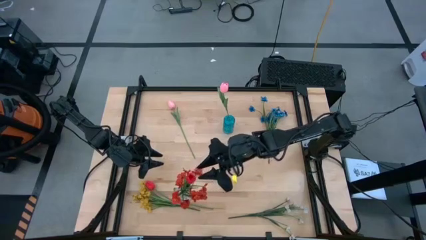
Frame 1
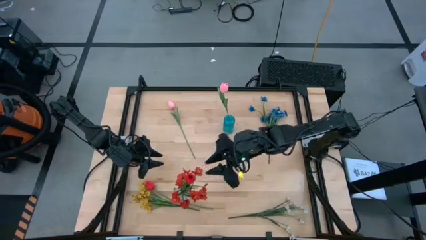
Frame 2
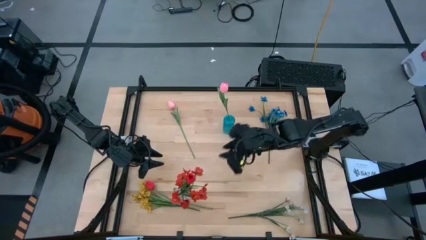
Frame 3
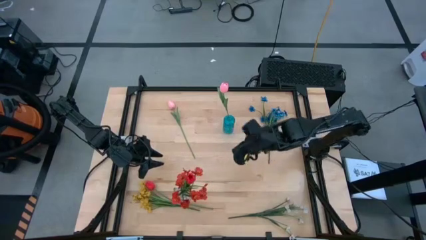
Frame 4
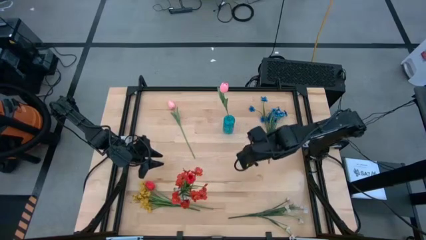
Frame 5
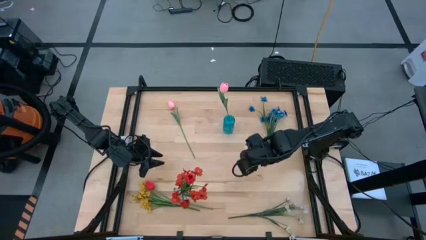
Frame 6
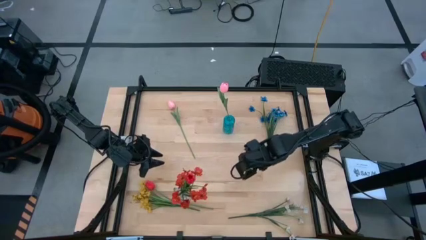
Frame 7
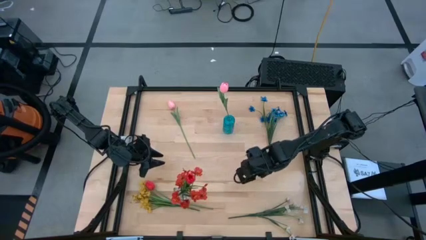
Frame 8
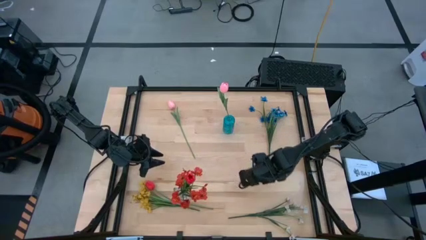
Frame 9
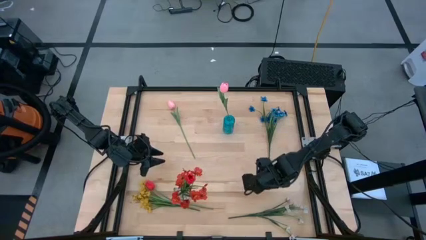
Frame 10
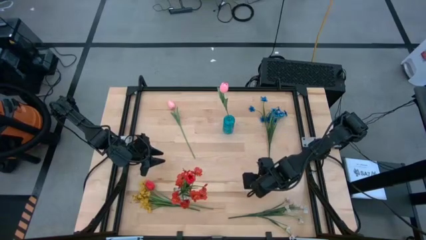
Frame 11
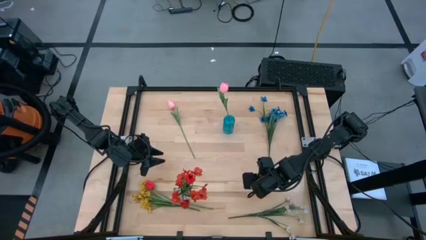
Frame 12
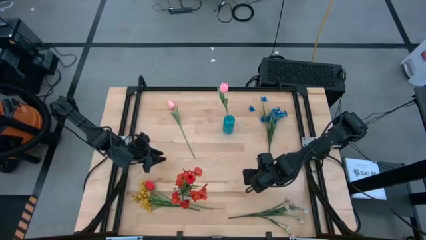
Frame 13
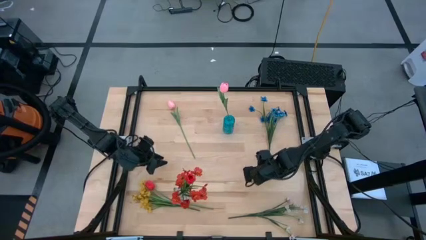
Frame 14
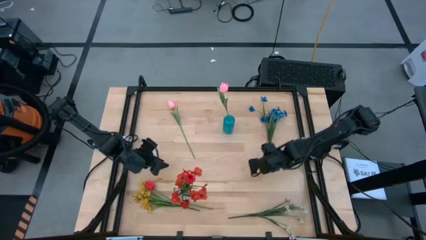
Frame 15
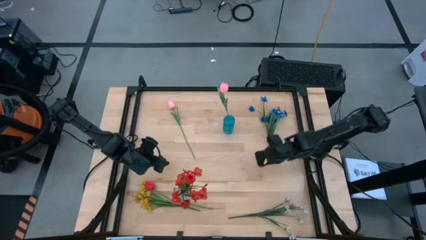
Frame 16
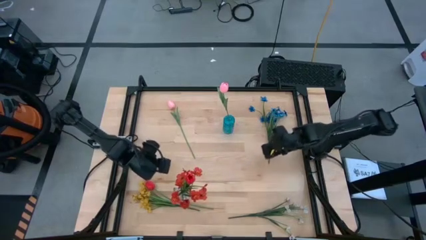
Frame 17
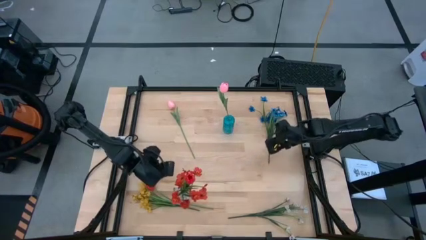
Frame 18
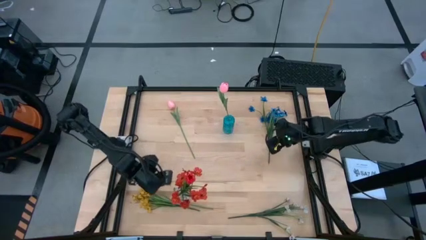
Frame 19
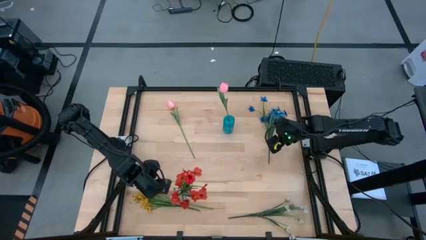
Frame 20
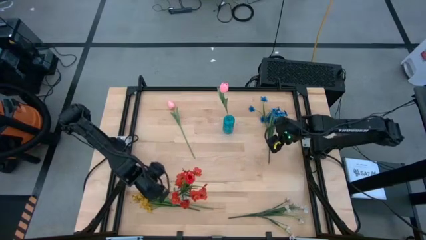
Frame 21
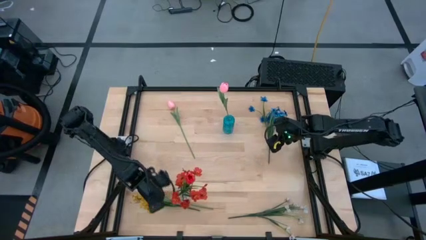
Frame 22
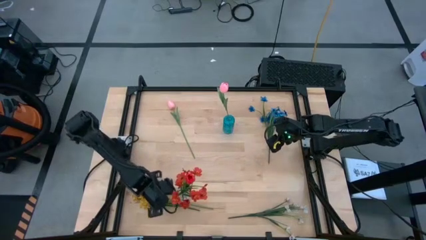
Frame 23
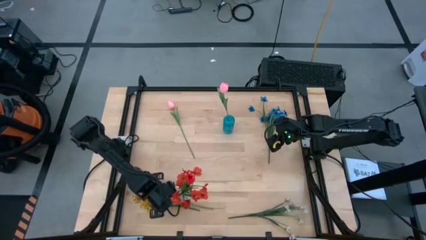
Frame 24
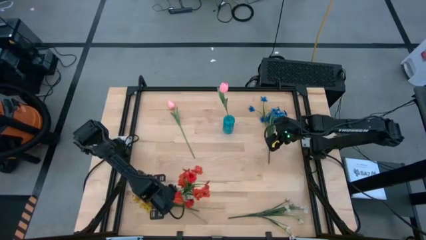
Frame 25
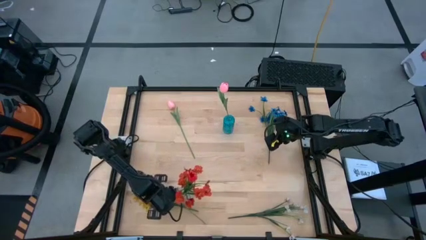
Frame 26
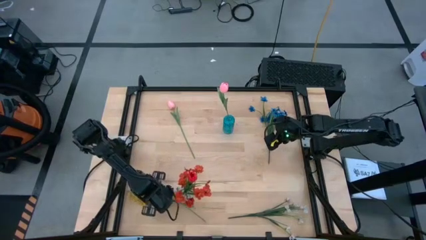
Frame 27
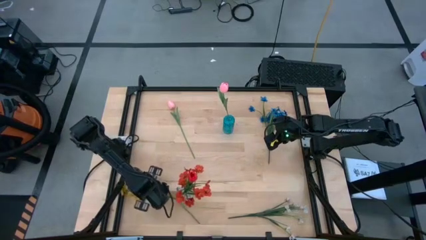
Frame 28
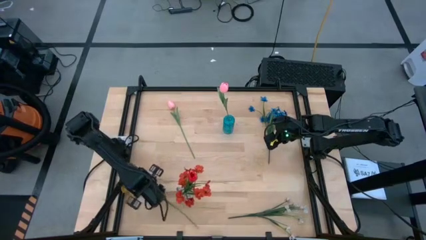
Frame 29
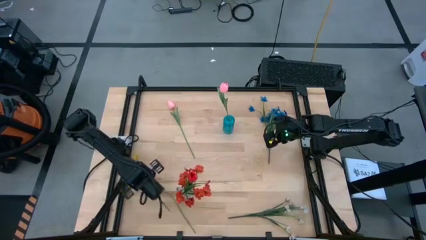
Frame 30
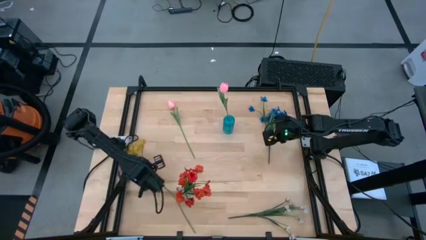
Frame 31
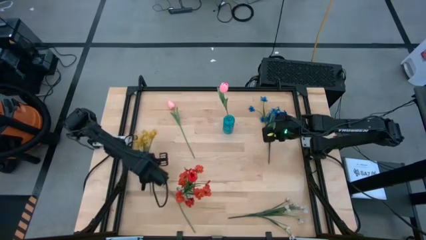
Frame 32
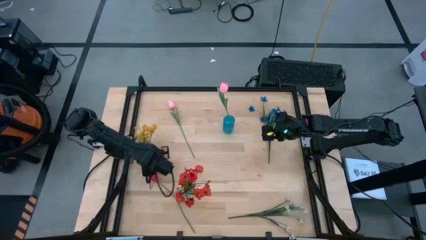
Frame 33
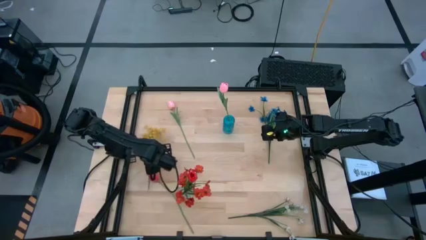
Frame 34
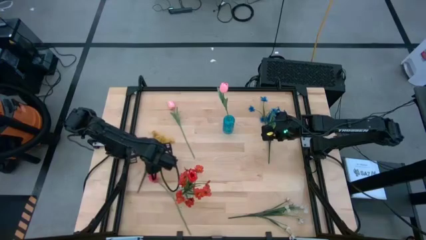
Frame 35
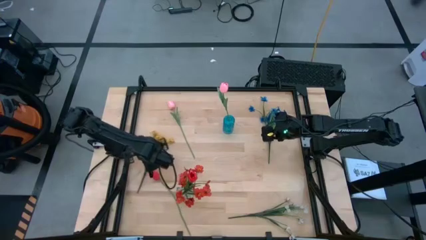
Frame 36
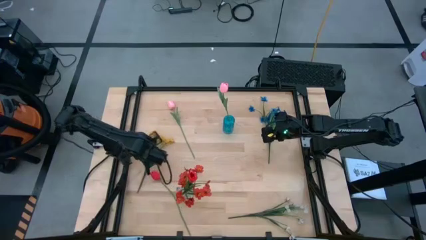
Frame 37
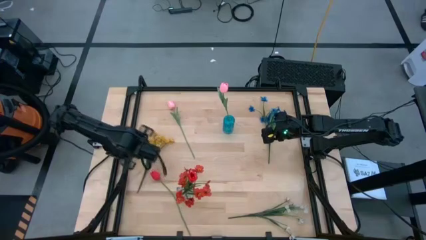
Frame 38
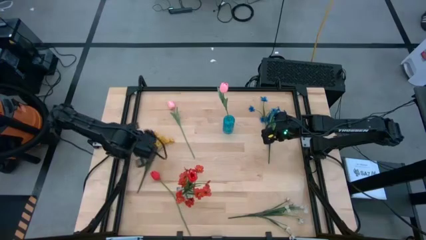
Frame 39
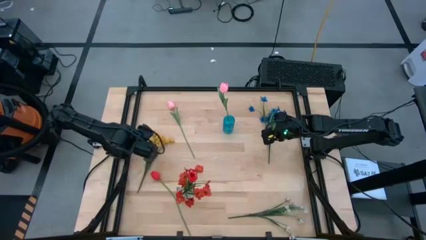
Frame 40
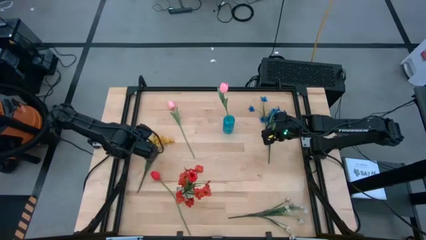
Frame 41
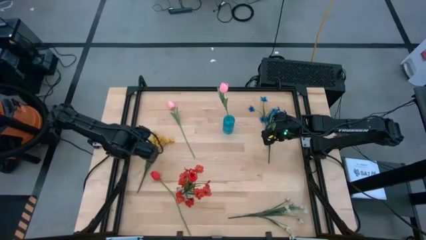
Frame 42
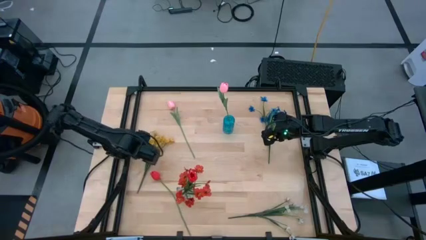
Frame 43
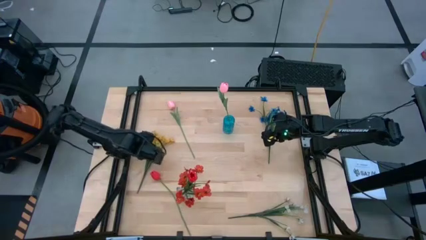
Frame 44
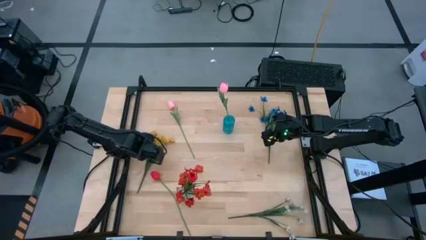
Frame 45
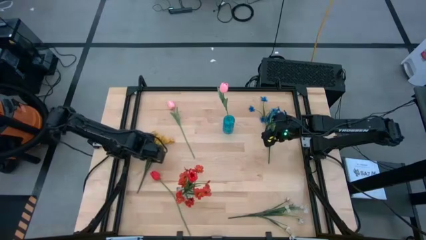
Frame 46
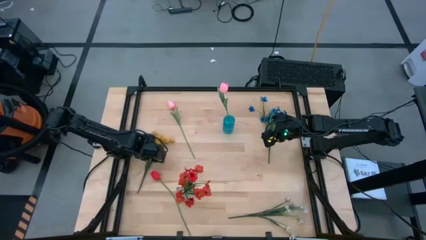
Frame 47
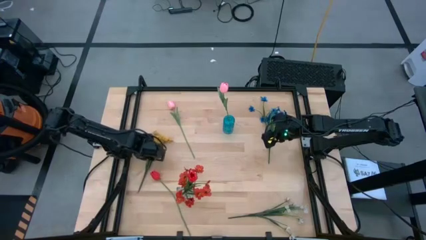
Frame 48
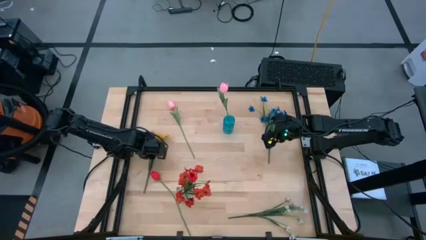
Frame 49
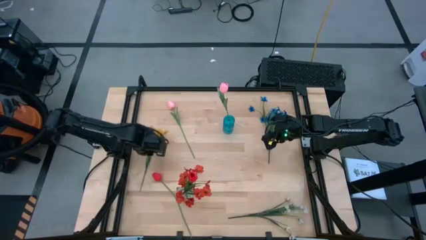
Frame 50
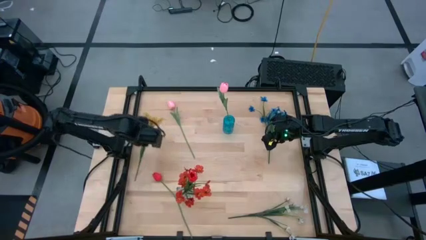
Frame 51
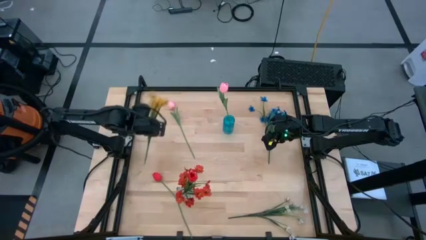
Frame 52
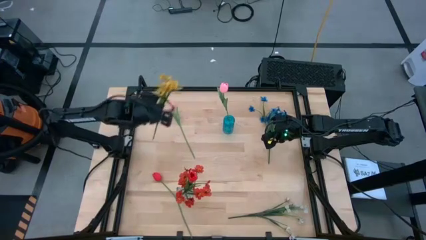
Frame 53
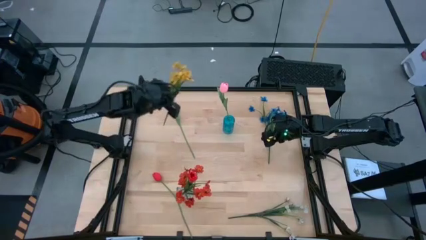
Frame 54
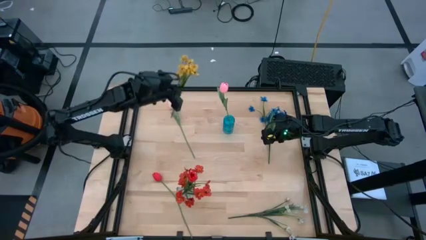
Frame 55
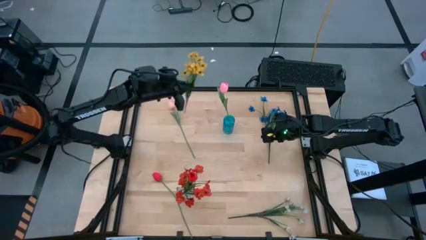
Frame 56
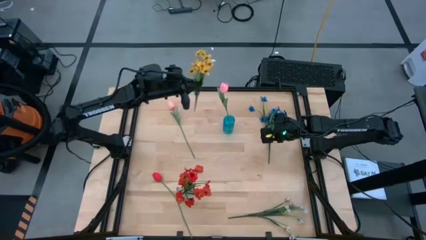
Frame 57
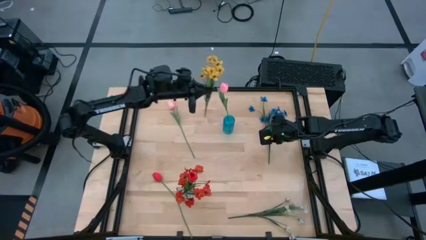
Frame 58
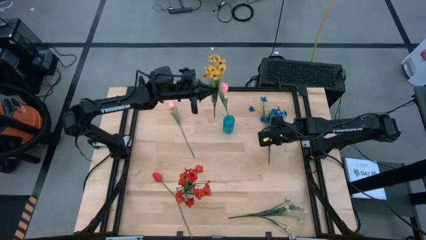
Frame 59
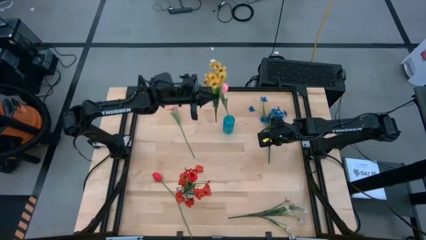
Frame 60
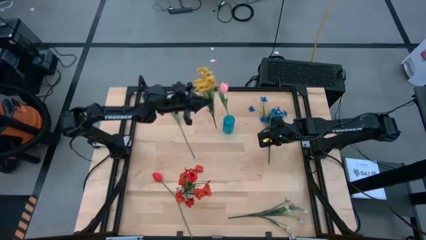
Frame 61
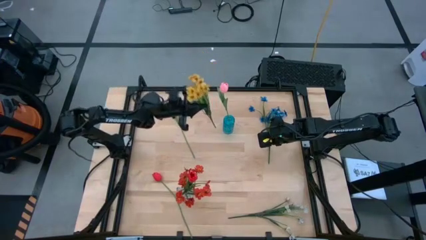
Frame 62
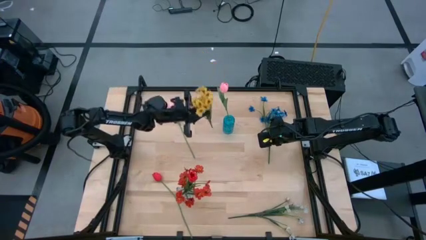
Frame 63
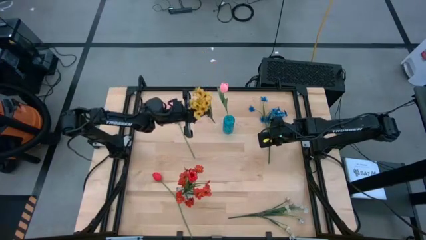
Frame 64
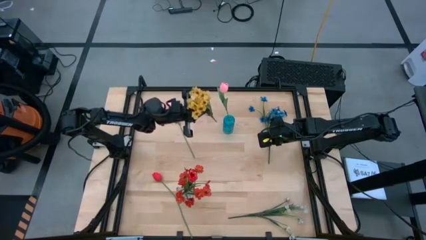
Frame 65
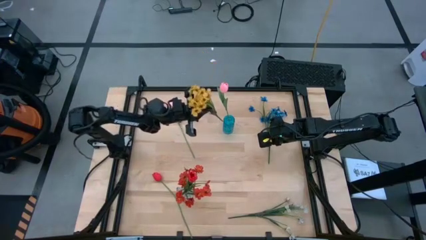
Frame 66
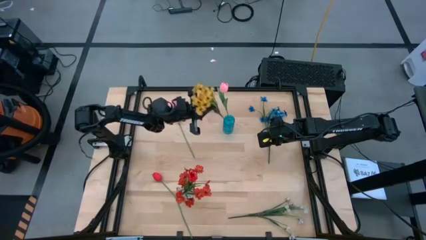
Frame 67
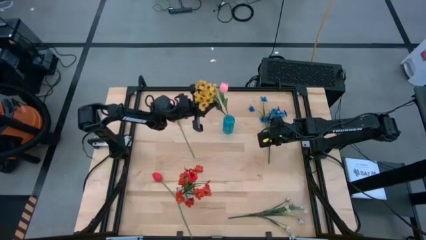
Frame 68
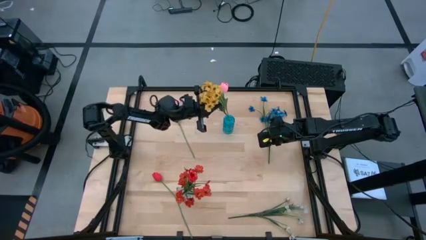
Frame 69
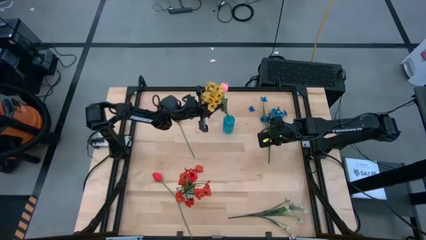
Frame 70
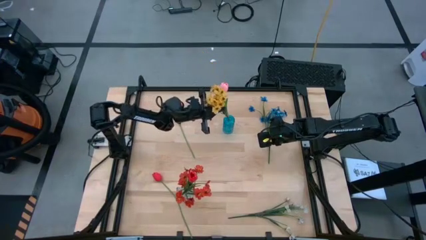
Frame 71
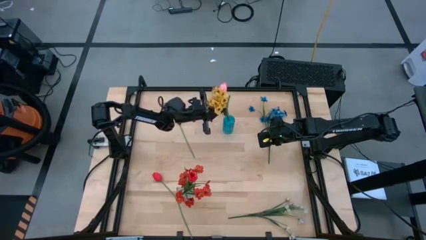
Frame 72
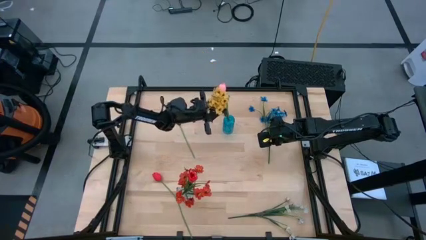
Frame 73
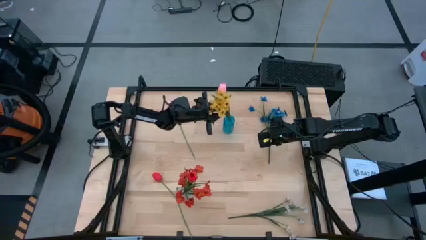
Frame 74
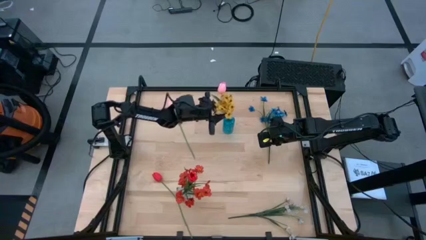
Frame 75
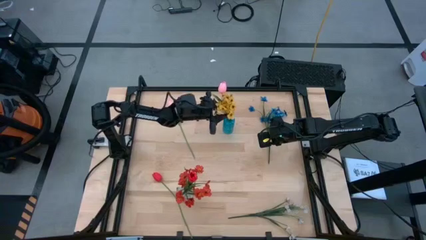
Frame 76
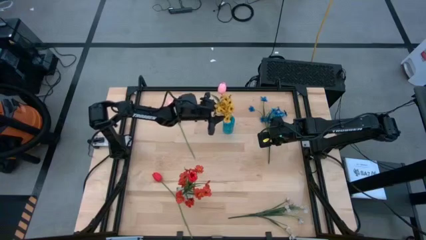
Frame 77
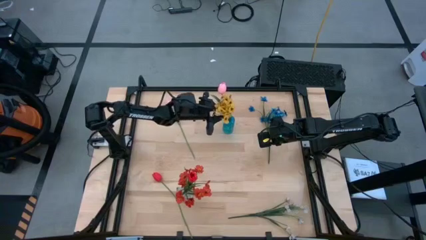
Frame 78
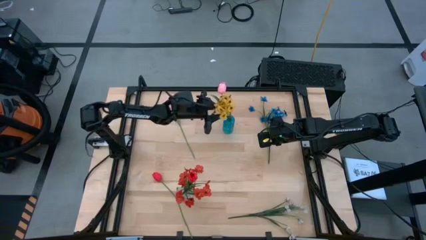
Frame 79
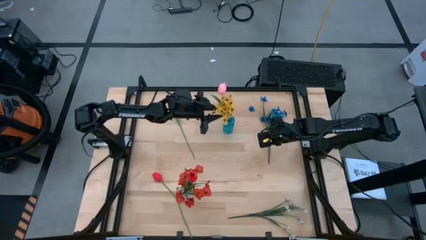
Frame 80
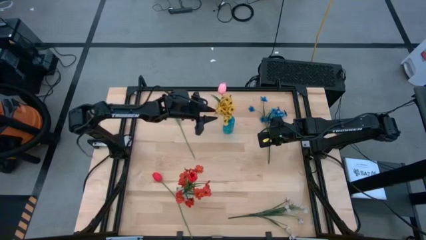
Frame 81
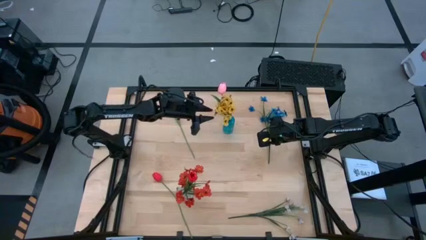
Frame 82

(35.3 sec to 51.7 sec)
Task: Sort flowers into vase by color
Put the yellow flowers into the blue vase
